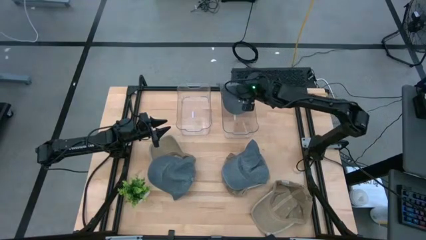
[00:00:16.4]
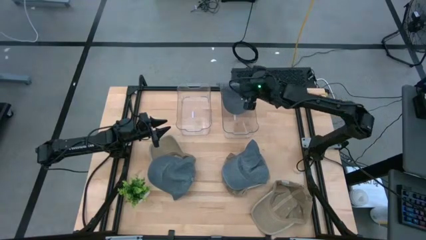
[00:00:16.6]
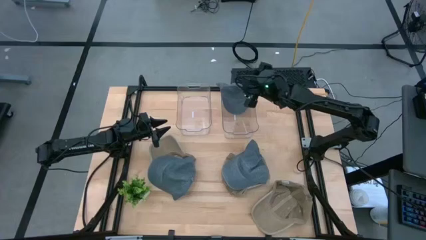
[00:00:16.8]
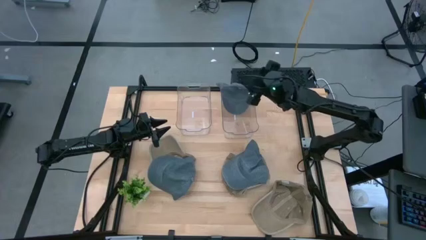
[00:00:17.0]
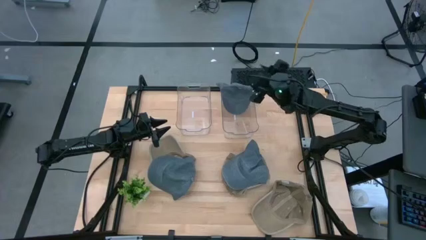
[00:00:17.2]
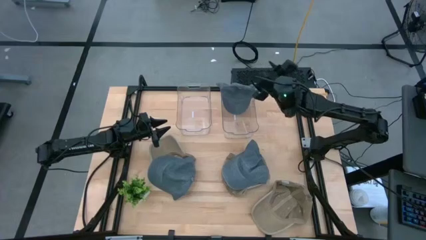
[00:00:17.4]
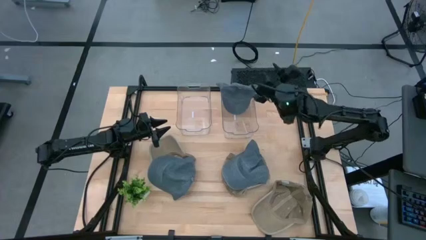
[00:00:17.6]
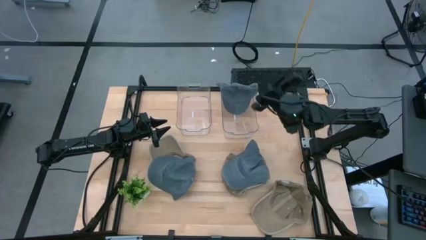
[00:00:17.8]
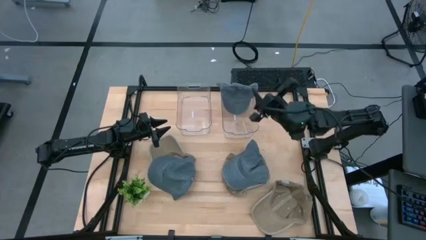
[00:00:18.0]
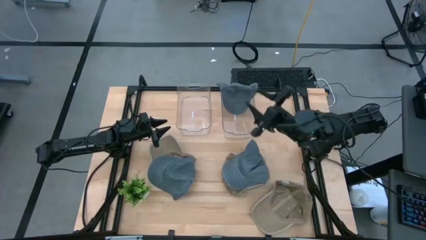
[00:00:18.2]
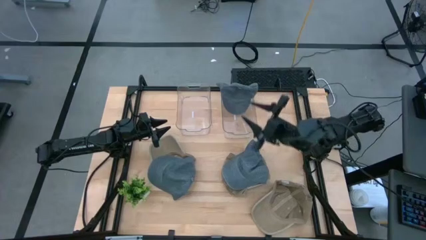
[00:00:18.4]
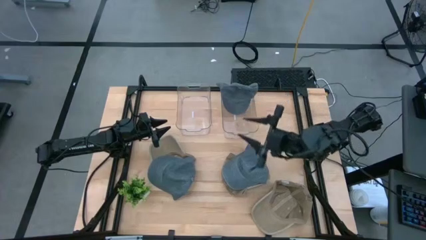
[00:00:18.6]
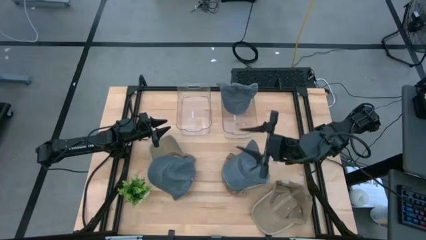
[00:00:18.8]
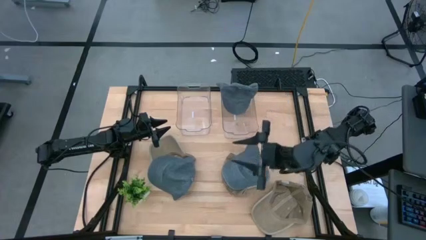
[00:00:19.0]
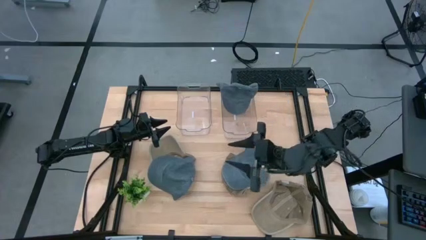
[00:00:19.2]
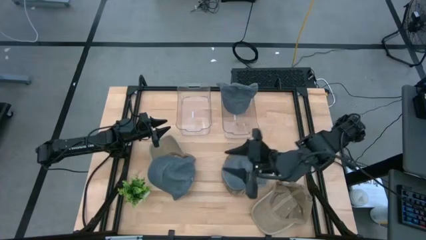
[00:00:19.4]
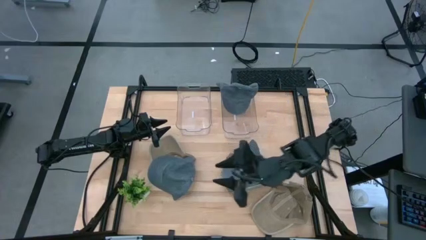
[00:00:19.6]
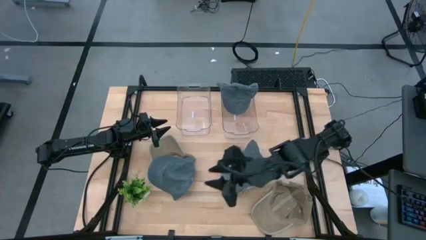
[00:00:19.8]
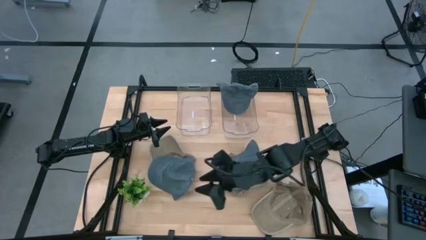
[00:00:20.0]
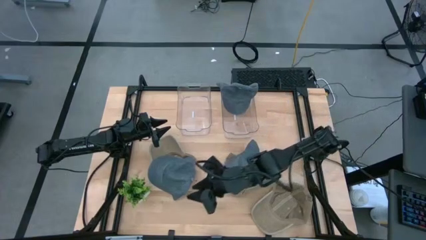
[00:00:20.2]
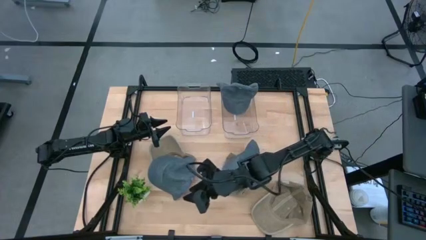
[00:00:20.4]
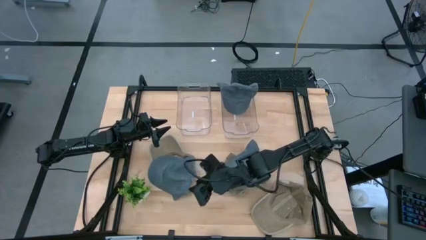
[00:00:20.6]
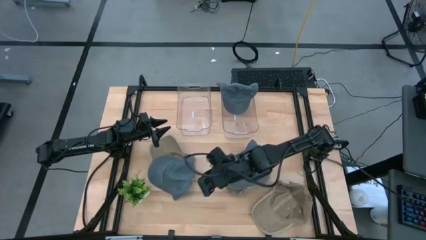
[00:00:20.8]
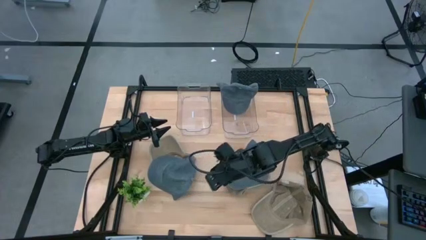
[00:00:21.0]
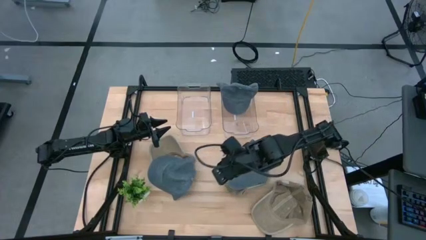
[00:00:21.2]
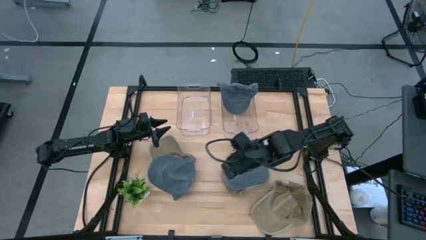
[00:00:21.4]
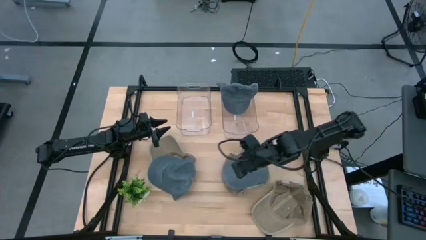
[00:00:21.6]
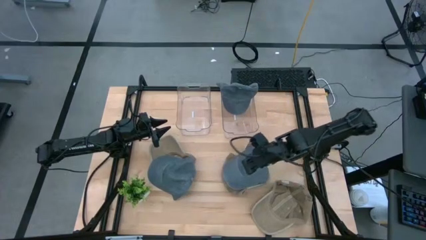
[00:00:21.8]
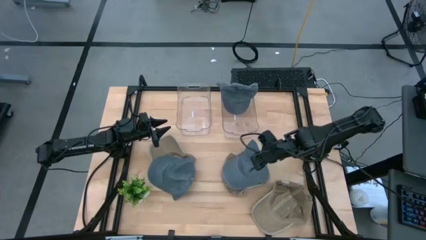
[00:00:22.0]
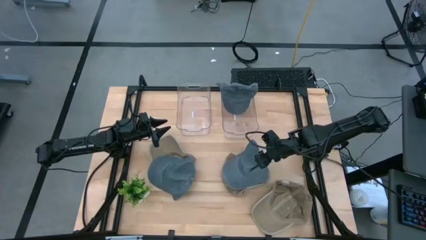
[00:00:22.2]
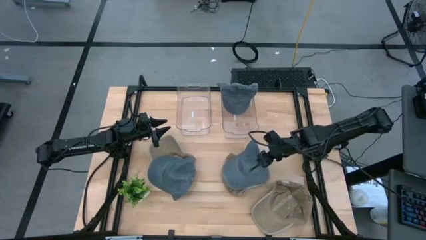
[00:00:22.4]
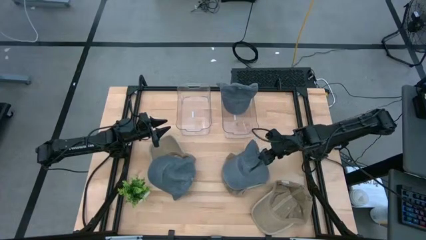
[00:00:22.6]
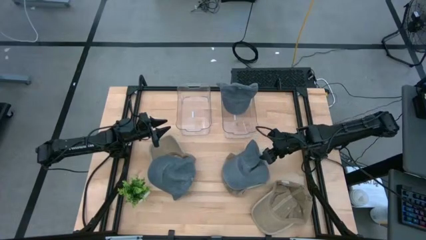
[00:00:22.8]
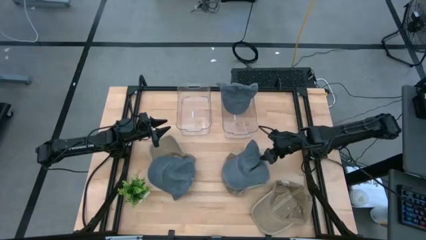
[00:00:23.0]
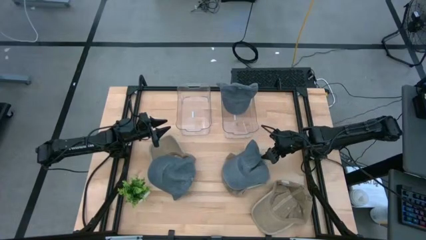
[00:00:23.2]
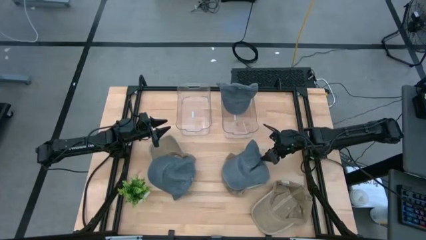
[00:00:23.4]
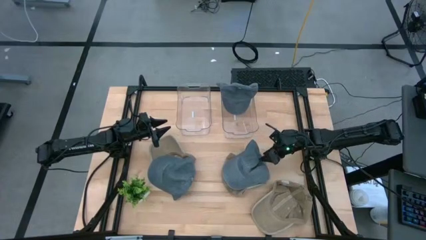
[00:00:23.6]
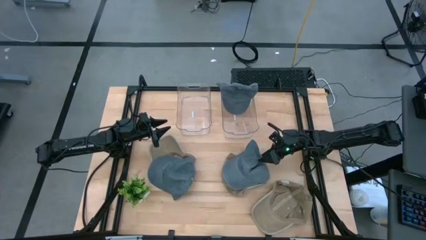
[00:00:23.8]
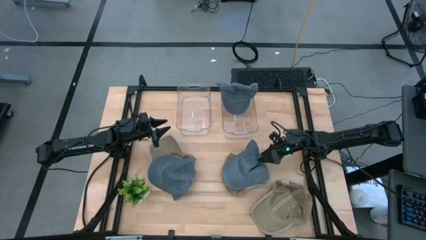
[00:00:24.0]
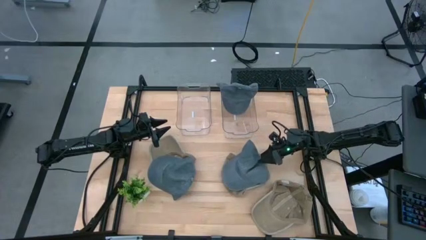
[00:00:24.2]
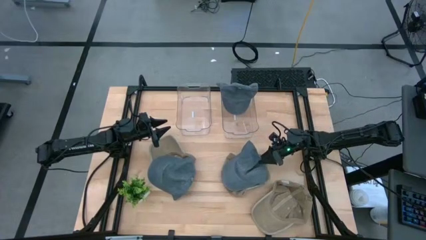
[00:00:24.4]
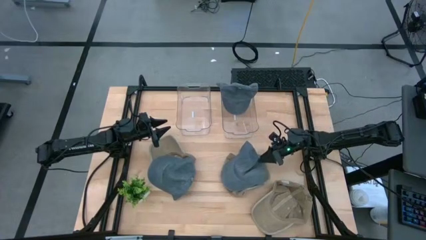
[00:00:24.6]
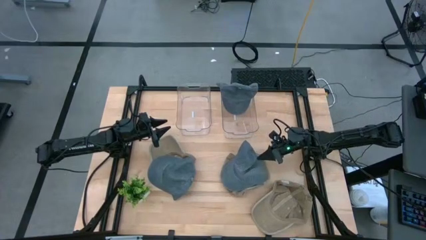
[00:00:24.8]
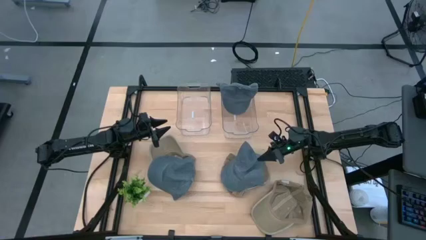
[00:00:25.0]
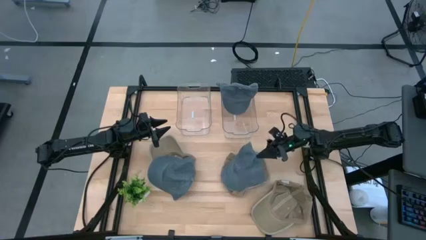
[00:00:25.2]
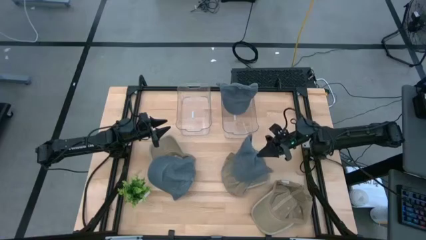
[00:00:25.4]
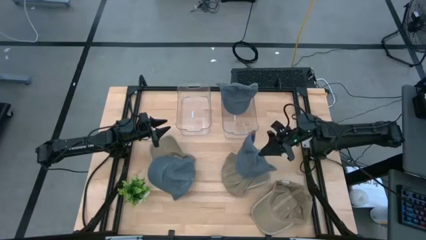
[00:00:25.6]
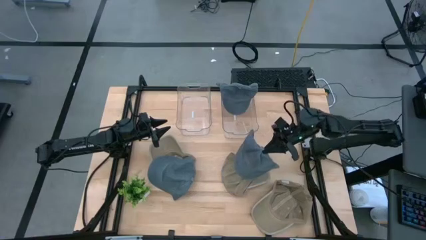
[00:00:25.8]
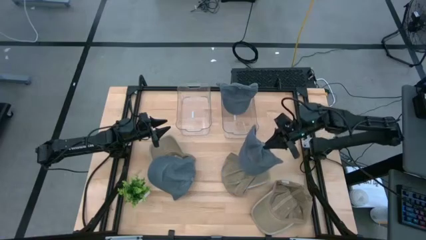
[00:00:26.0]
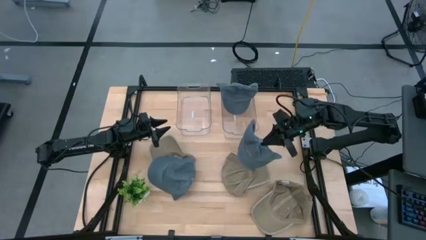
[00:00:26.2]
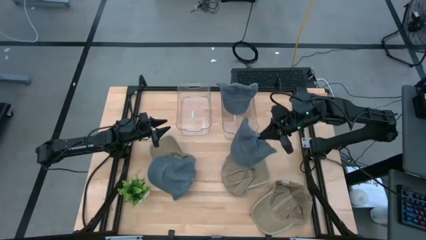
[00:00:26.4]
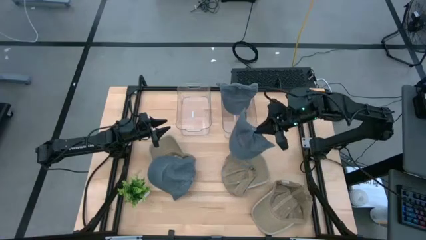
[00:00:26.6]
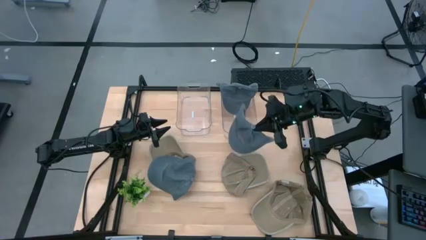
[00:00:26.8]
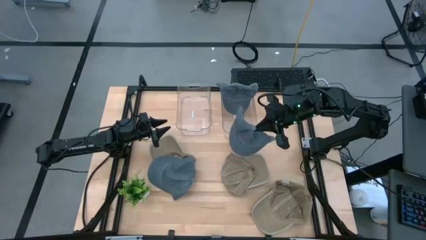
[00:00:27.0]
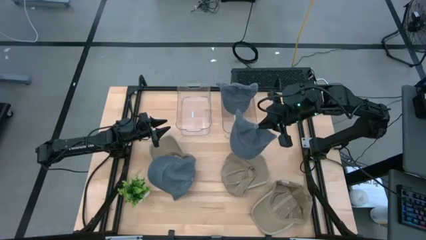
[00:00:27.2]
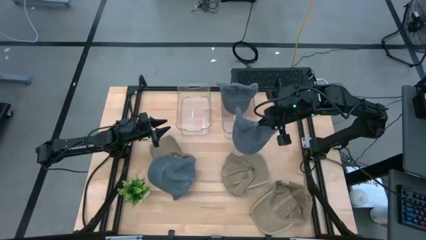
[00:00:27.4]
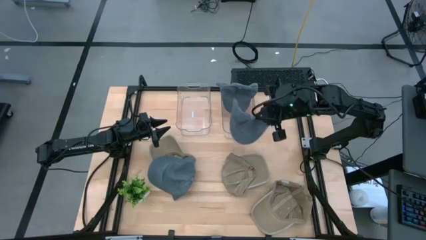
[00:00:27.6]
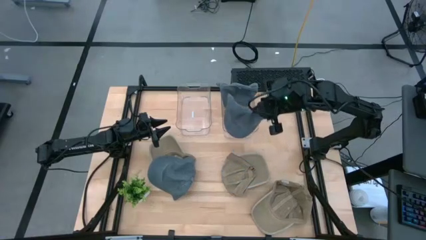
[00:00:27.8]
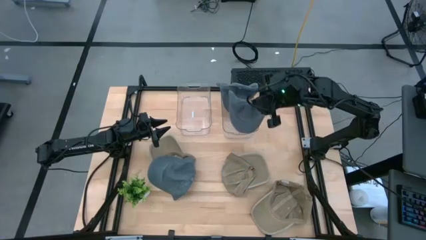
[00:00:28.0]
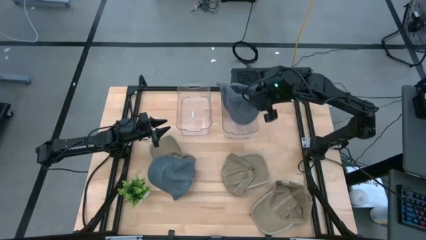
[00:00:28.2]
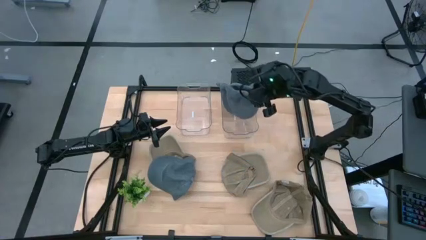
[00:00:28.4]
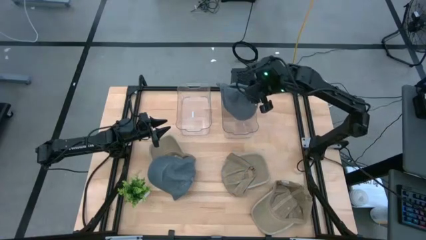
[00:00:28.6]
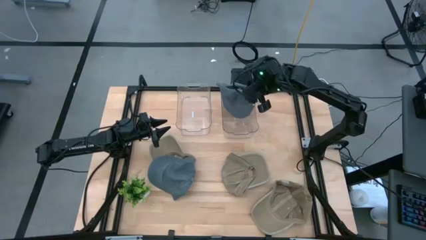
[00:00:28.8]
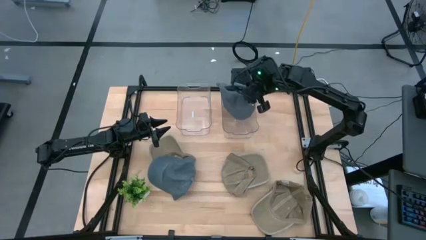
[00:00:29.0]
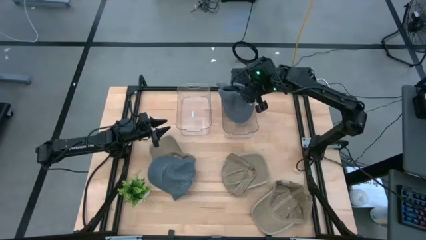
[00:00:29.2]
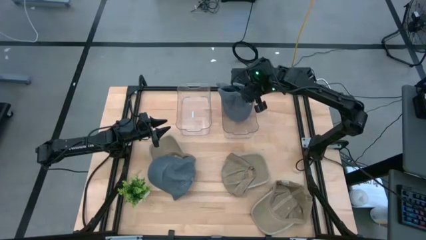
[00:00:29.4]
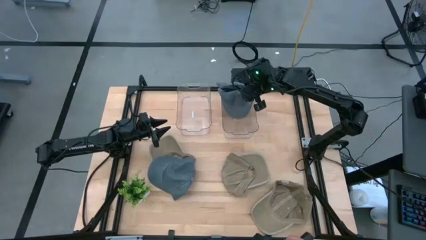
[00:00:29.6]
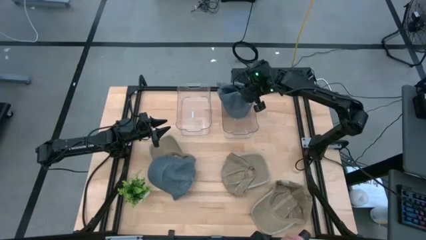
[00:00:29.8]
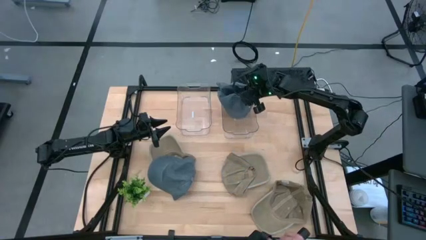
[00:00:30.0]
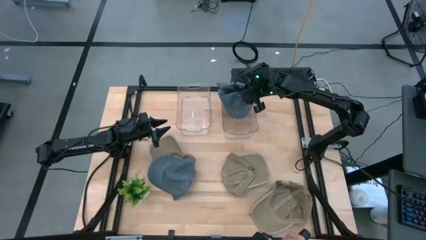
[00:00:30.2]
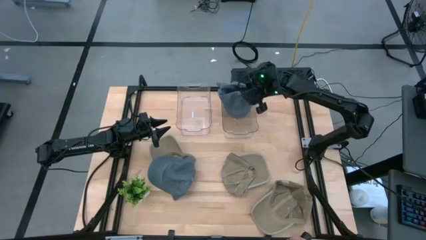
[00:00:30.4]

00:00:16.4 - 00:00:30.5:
Task: Pick & Place hat
Put the right blue cap into the right transparent bin
